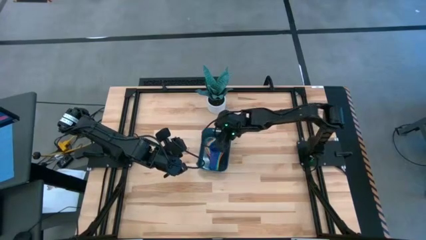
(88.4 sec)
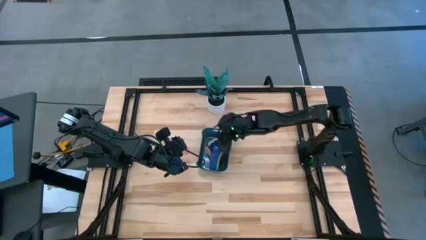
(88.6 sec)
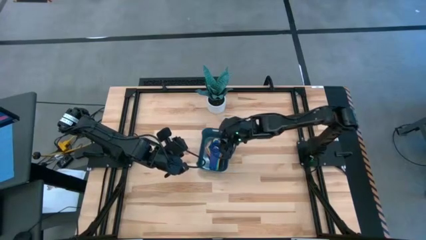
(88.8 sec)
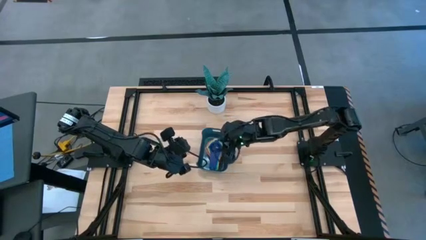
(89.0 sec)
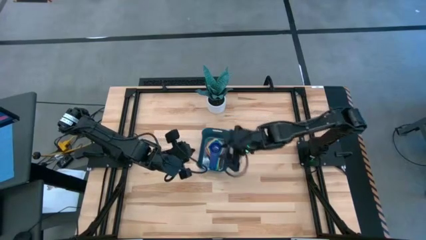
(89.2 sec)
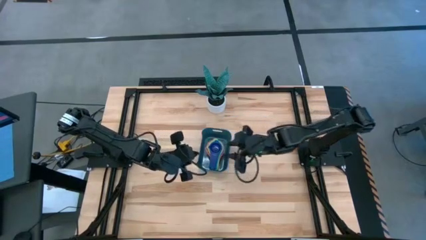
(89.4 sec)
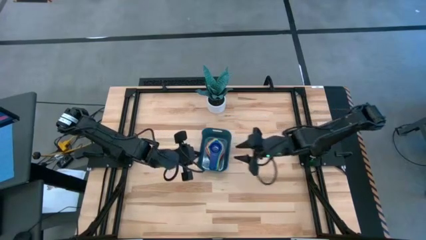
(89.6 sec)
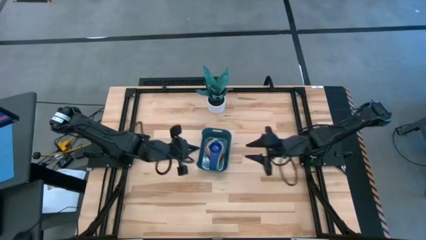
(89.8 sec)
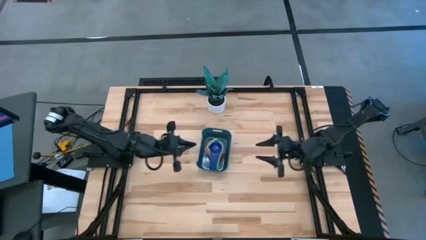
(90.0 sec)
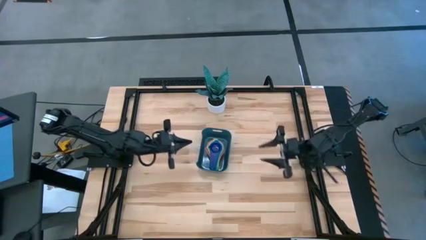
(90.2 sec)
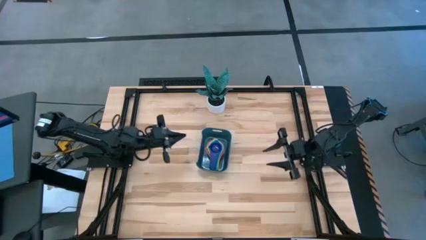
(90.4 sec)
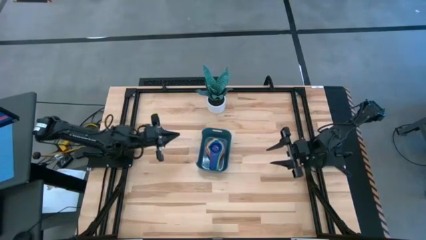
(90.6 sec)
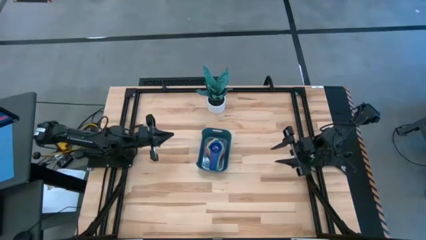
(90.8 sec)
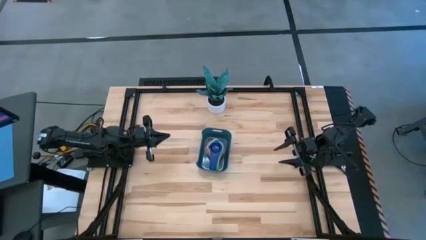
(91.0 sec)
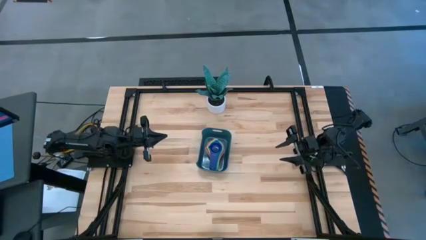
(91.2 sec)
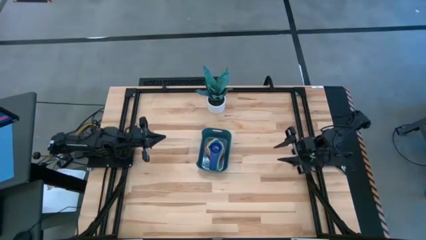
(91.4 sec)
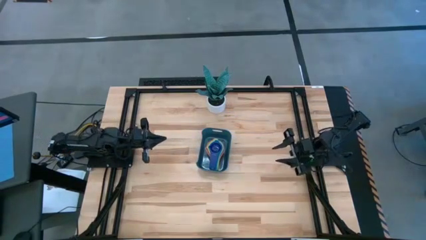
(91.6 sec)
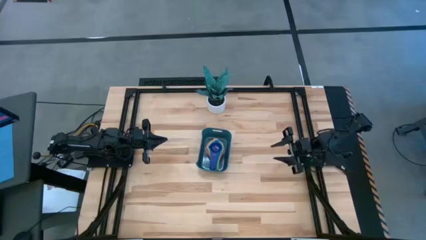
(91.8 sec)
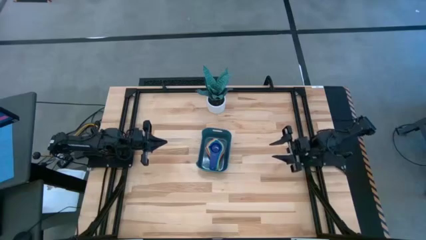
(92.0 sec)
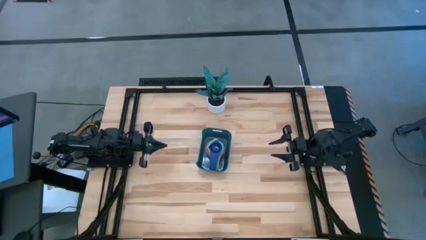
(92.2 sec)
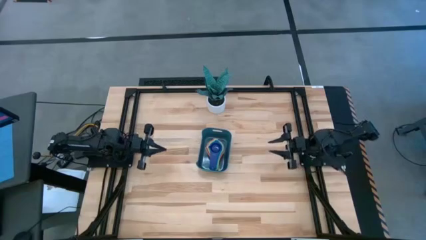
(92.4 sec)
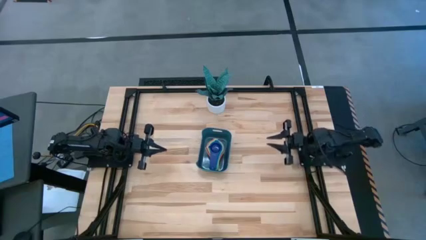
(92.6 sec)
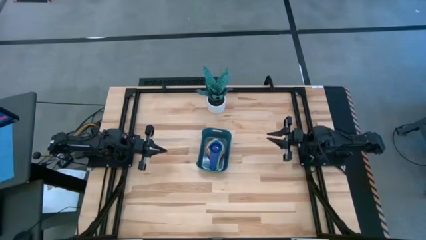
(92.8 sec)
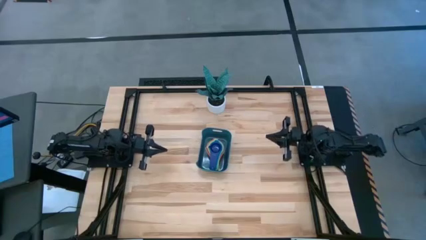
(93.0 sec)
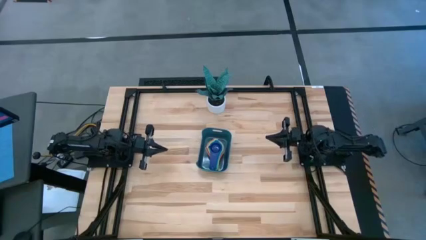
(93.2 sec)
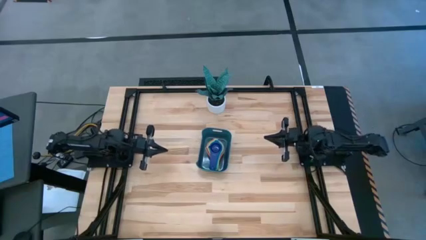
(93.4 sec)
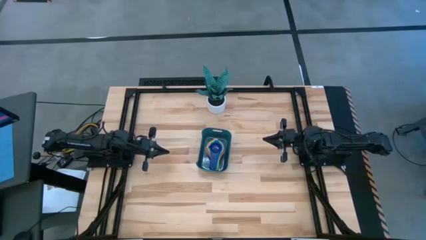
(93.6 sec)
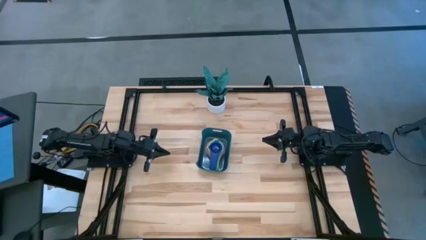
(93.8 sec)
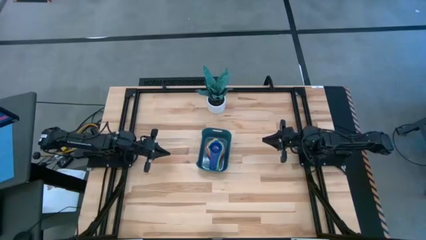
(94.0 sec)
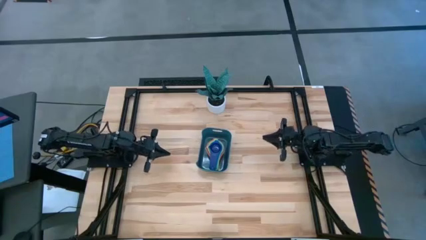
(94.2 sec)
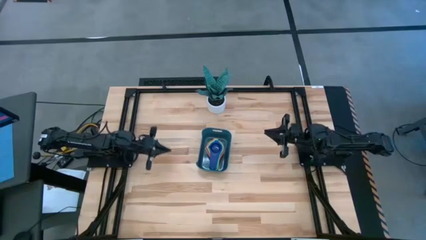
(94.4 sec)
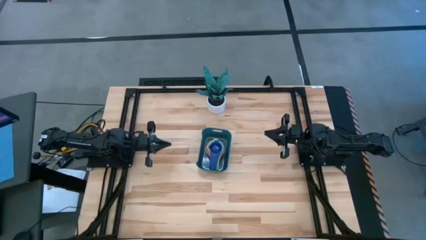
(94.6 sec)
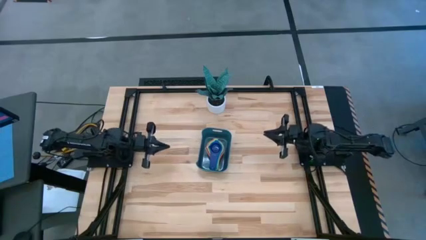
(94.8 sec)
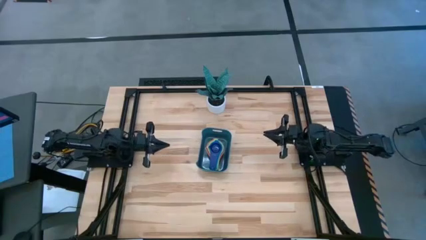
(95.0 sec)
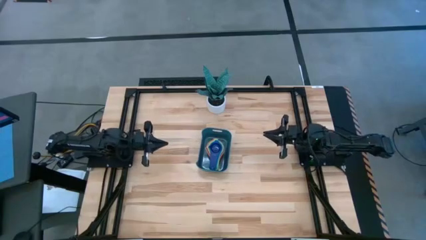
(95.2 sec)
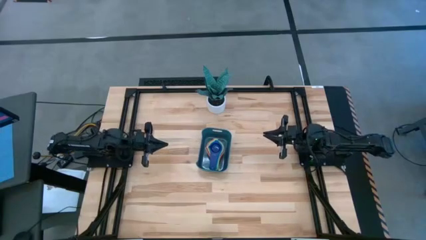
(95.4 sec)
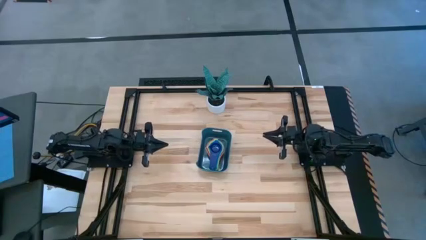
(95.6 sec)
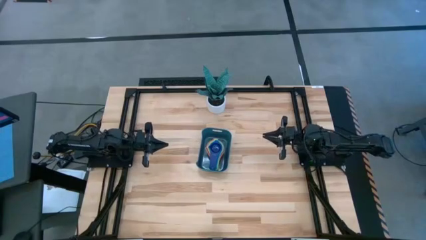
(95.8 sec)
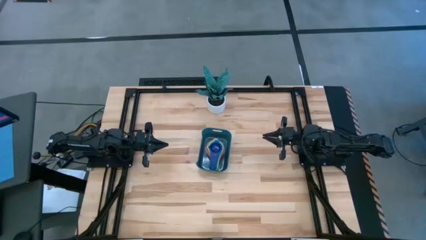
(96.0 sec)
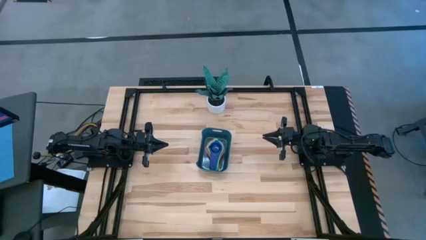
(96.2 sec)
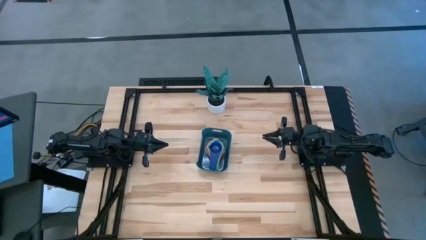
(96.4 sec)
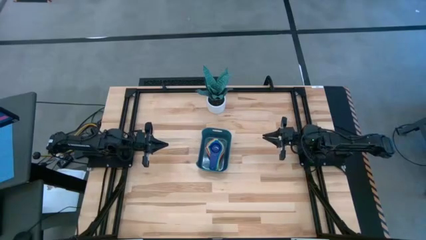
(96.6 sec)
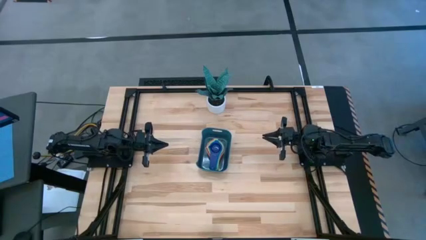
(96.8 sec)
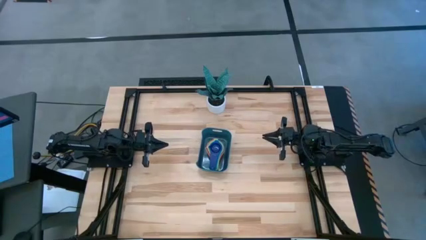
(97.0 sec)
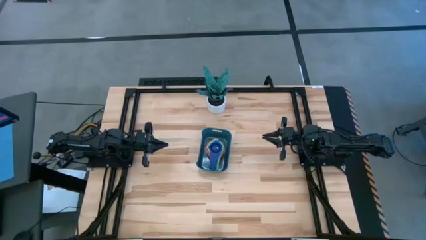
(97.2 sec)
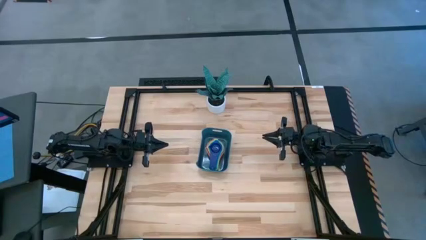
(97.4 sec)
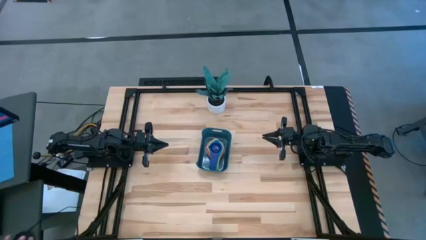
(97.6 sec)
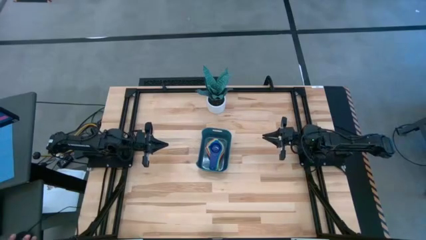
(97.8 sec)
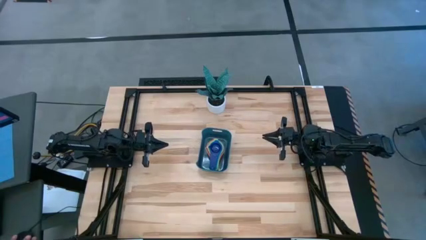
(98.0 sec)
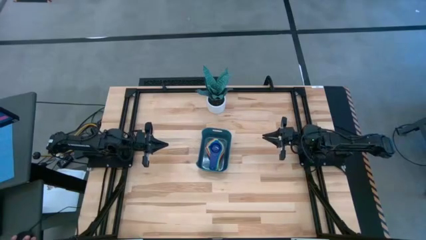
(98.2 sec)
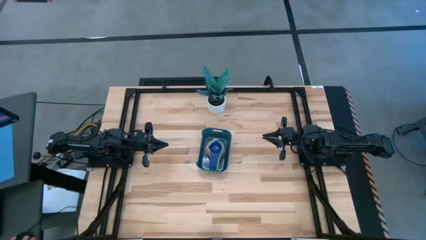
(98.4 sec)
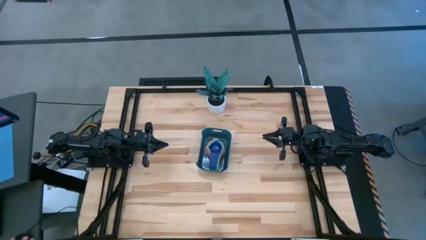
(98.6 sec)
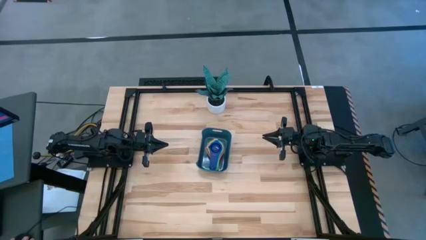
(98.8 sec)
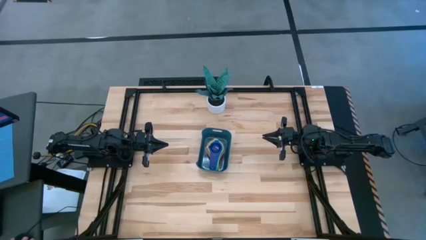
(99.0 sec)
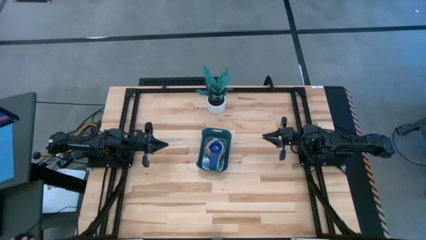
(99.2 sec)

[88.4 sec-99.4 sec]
Task: Nest measuring cups in basket
Return to Home Position
